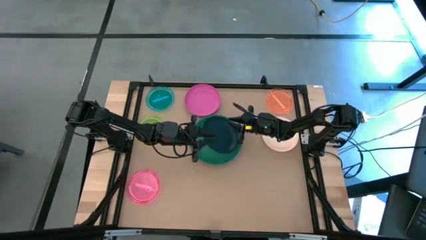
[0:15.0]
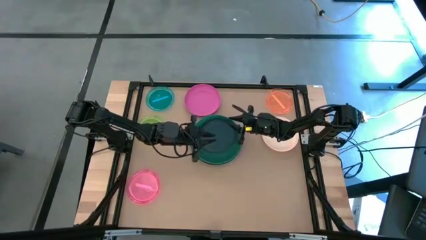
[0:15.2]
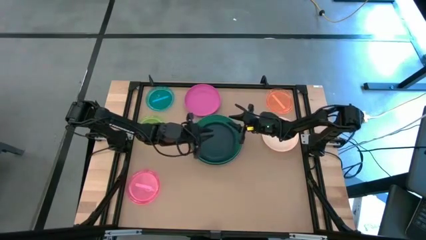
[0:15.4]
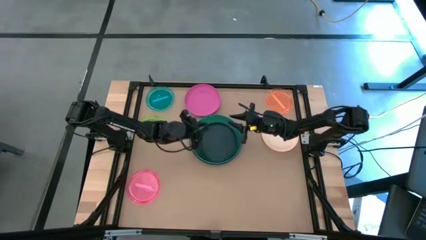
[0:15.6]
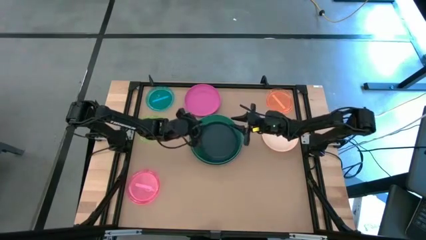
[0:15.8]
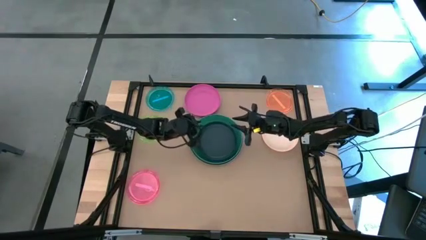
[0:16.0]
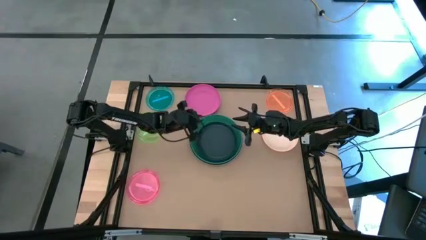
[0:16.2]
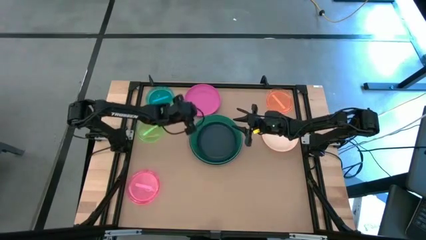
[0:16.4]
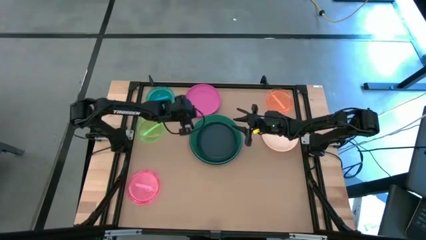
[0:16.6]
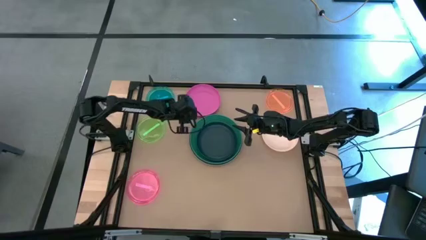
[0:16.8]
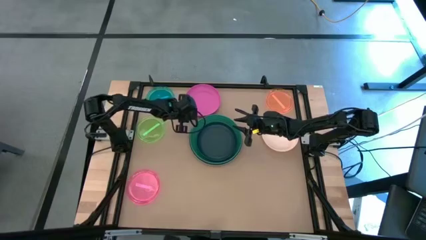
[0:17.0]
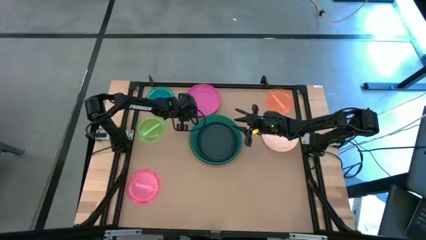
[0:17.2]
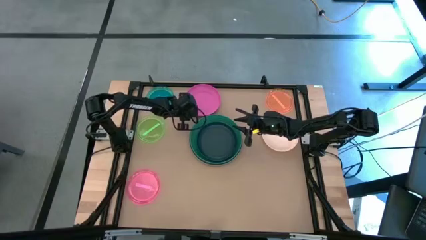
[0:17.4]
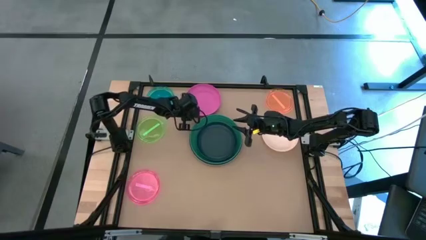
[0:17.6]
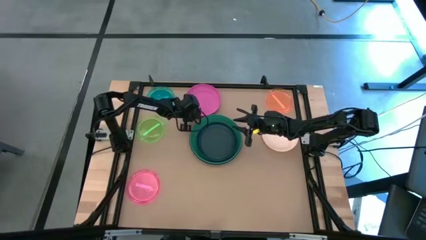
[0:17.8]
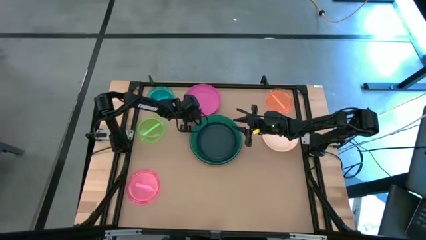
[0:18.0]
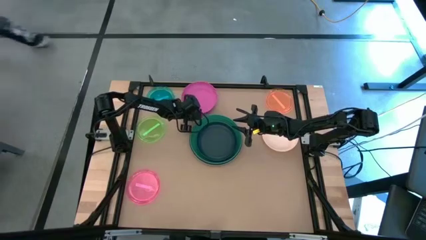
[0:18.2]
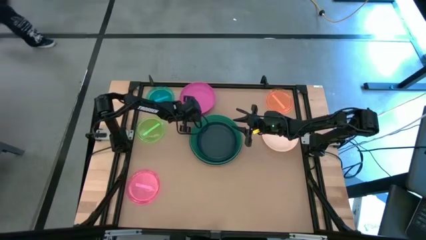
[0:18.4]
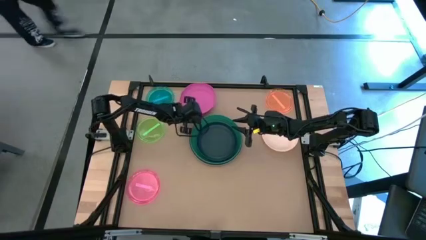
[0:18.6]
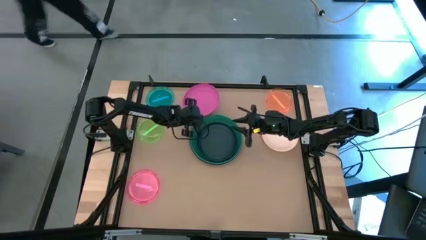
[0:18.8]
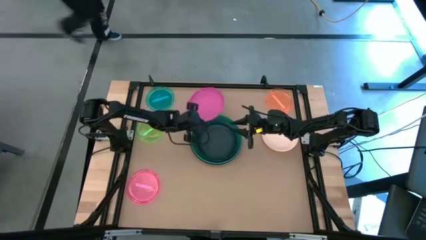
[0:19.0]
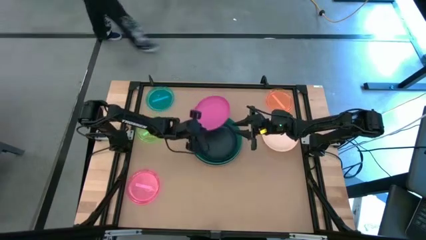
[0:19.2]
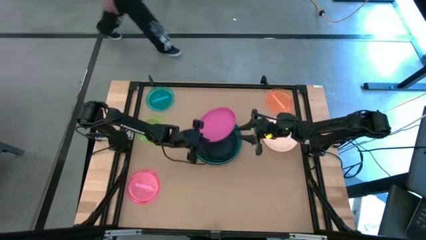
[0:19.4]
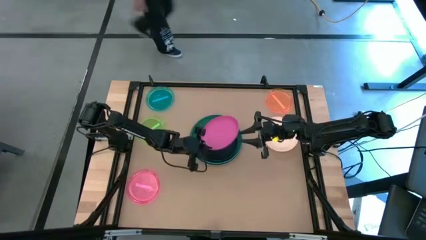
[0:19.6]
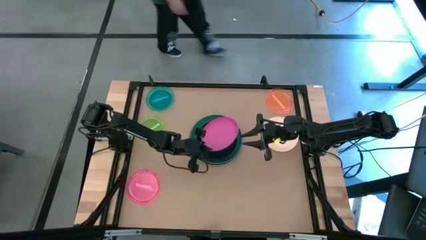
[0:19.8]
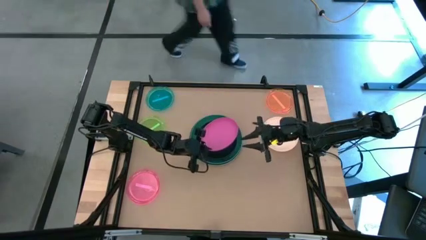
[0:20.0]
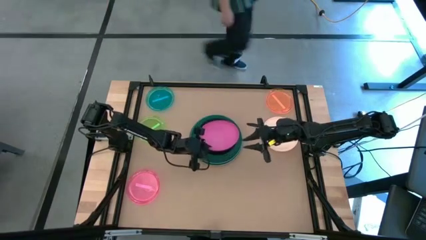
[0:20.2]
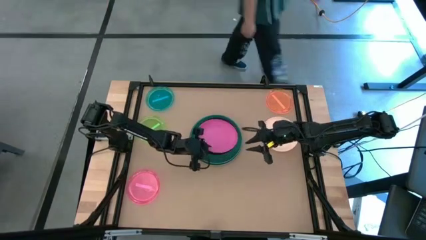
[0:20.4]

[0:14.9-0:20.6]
Task: Stack plastic plates
Stack the pink plate on the dark blue plate

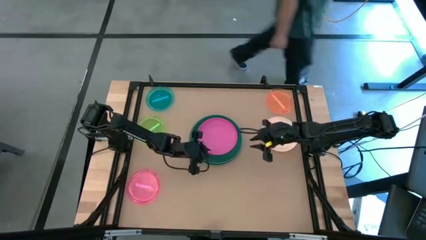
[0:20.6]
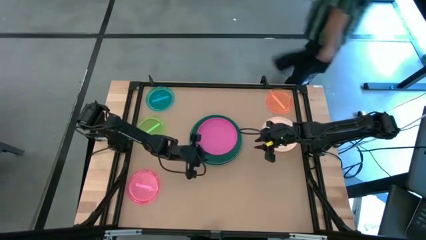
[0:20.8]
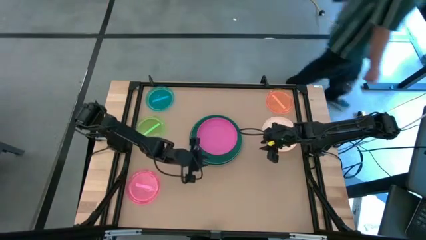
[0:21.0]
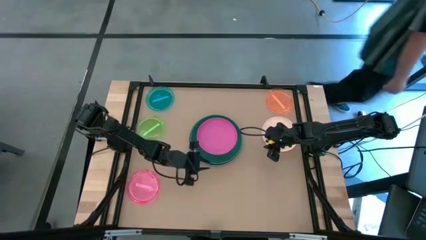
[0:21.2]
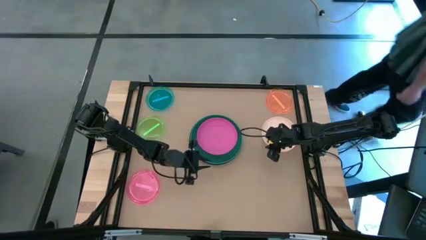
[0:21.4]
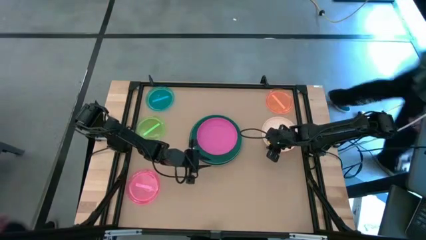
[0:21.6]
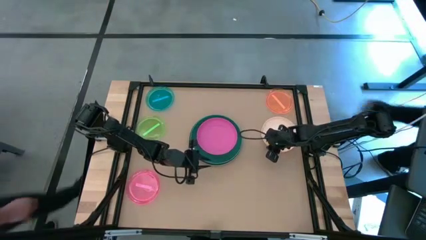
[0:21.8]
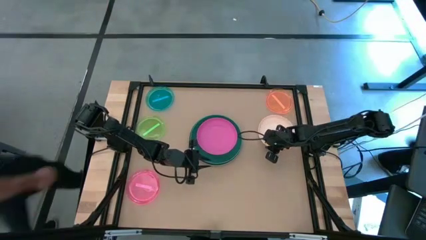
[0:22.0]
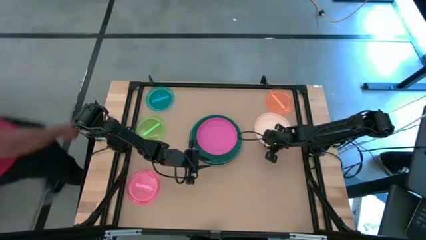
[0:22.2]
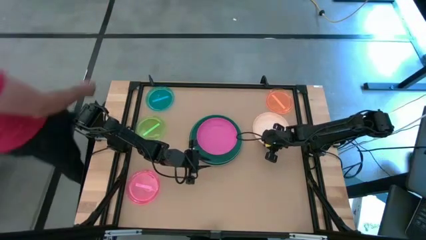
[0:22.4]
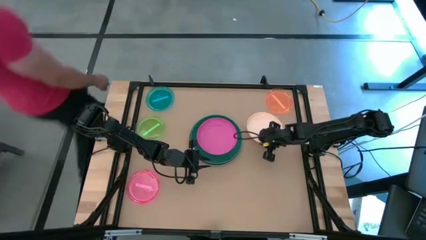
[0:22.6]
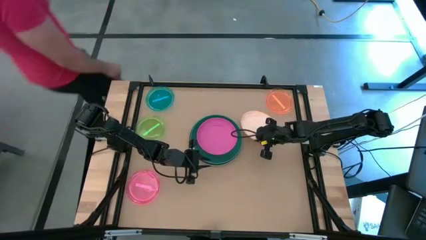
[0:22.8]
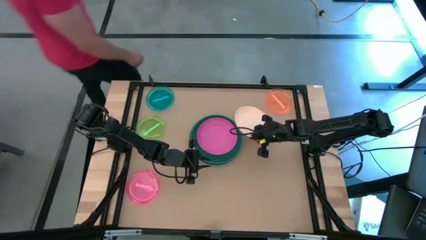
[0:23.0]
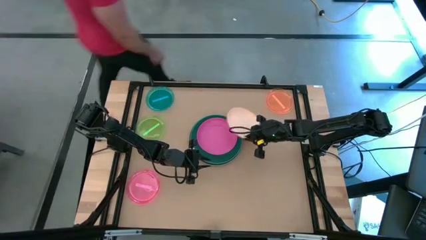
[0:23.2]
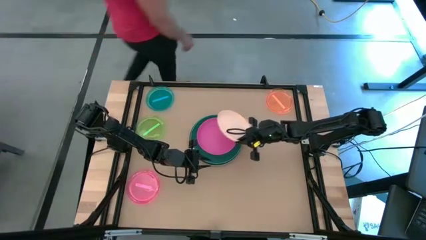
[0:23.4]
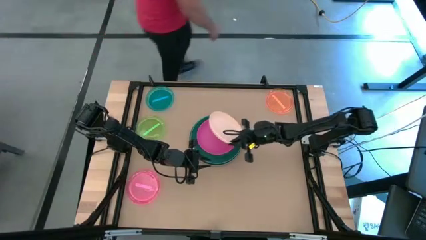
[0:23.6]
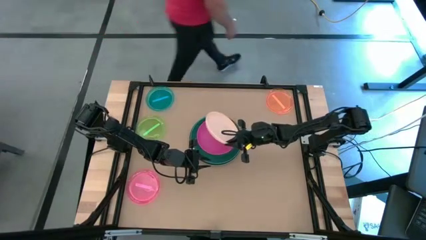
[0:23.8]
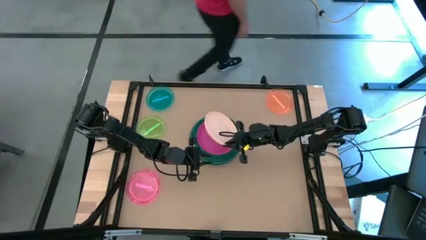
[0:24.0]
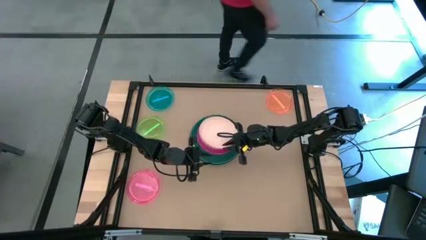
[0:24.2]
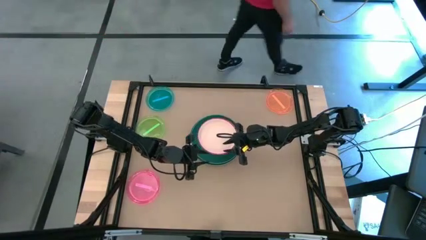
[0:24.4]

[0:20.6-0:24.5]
Stack the light pink plate on the pink plate

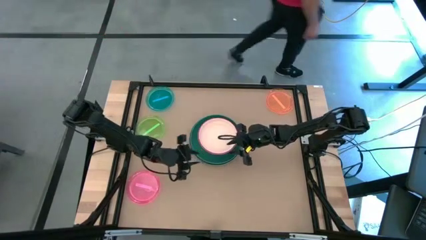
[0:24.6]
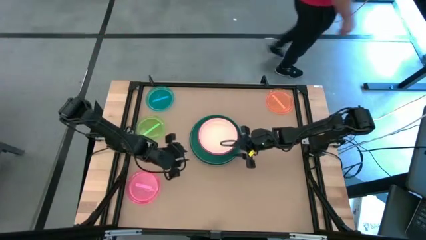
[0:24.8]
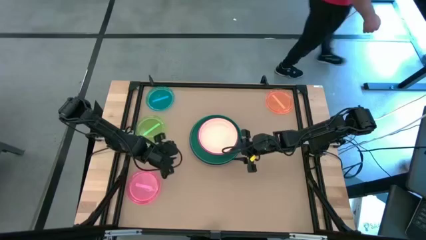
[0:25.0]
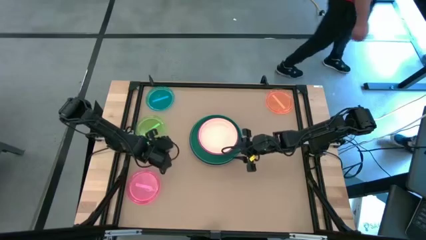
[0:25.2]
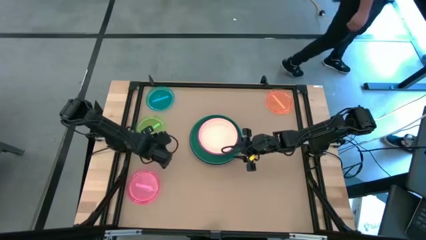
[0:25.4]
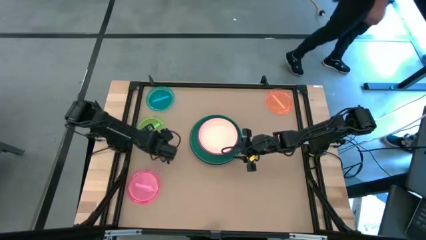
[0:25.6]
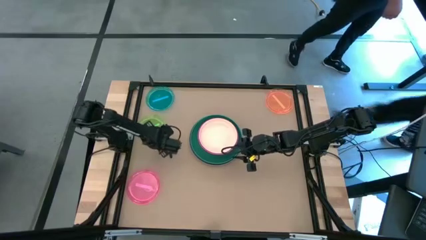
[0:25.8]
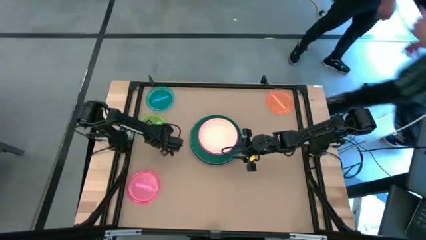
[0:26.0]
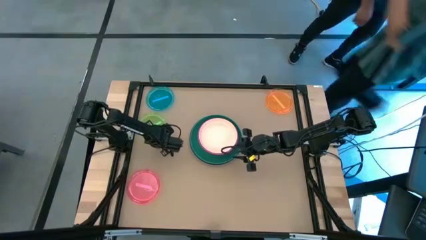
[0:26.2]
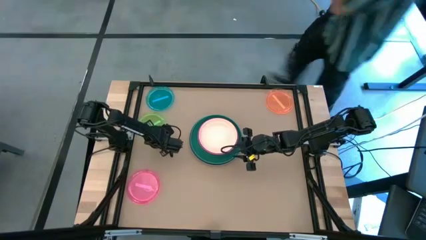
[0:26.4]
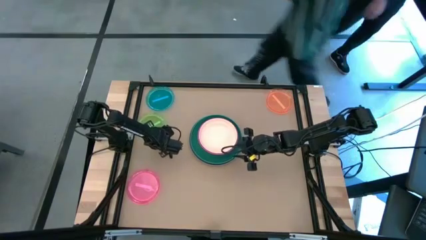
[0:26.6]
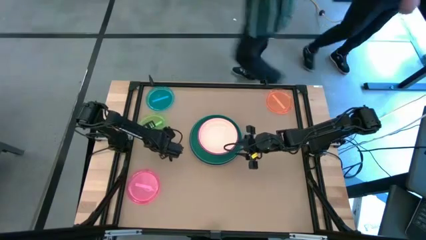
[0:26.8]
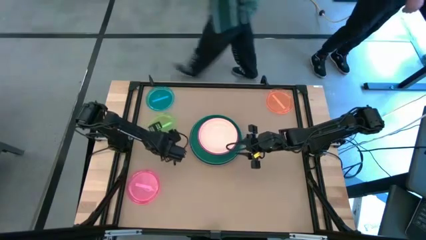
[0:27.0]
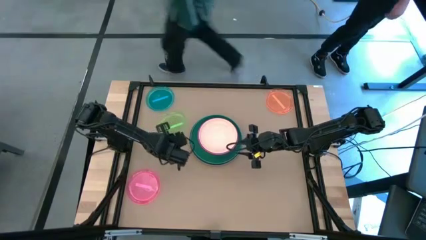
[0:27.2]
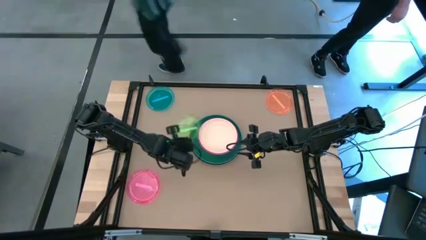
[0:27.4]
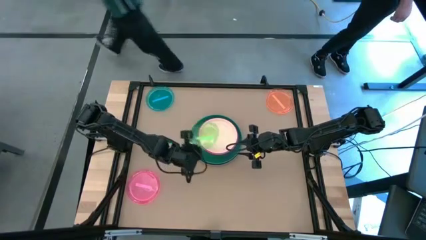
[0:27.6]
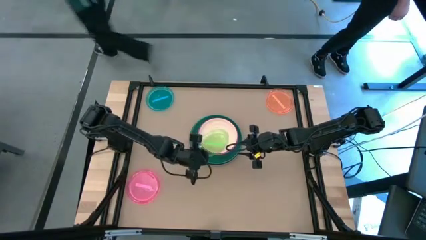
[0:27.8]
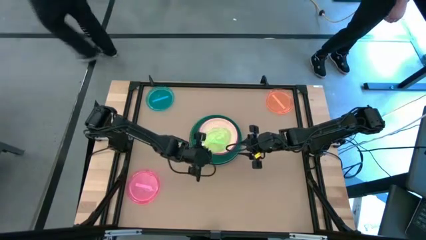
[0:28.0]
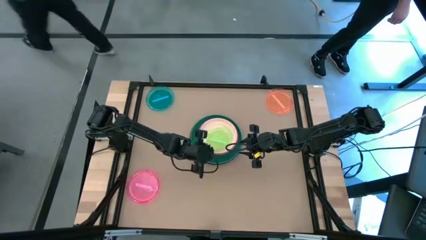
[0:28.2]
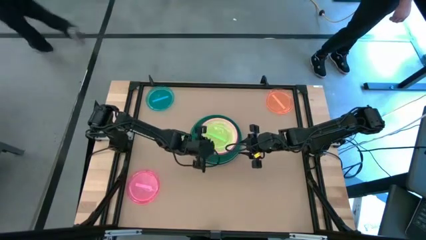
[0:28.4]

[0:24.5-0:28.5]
Stack the green plate on the light pink plate

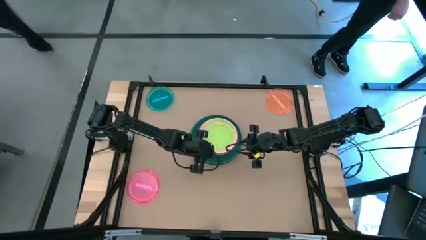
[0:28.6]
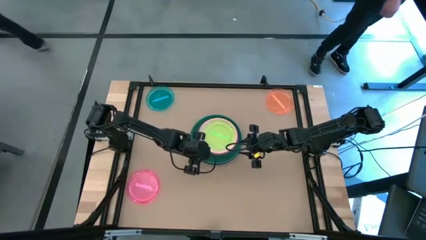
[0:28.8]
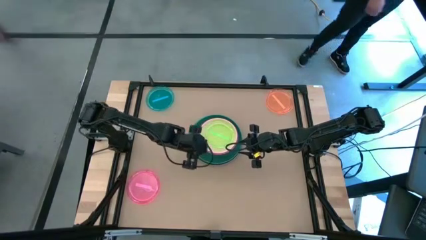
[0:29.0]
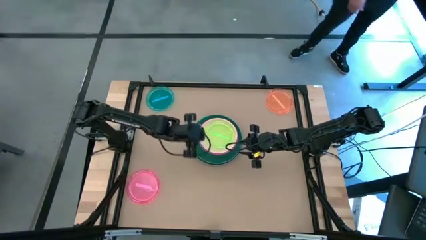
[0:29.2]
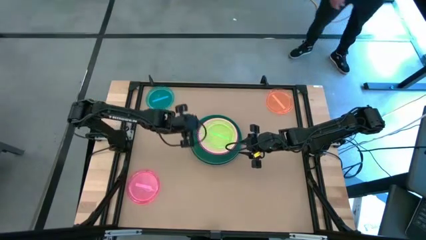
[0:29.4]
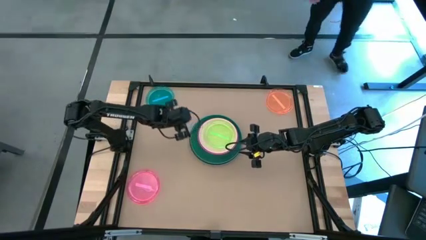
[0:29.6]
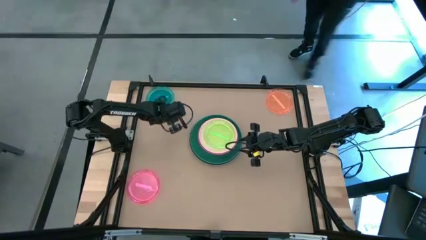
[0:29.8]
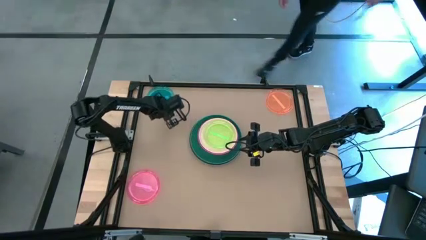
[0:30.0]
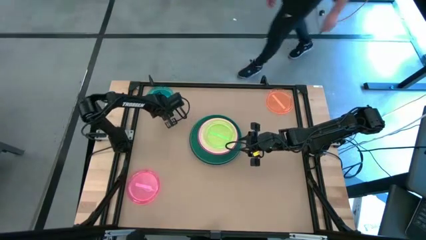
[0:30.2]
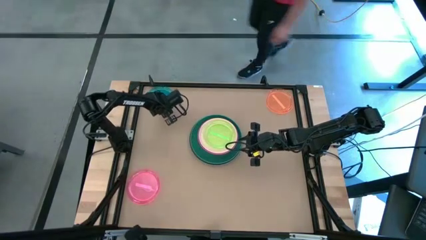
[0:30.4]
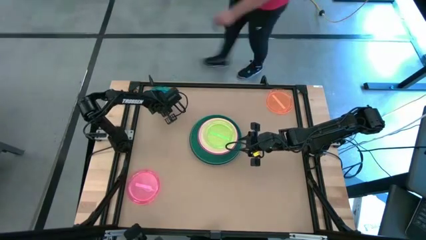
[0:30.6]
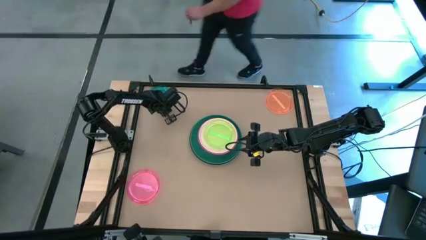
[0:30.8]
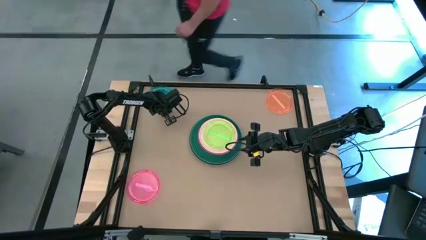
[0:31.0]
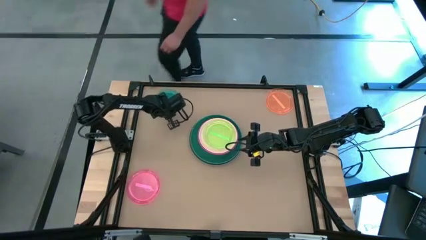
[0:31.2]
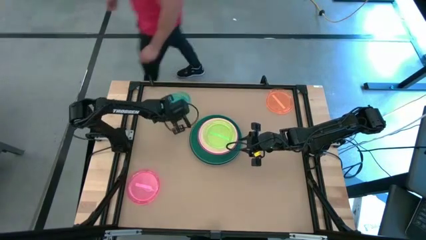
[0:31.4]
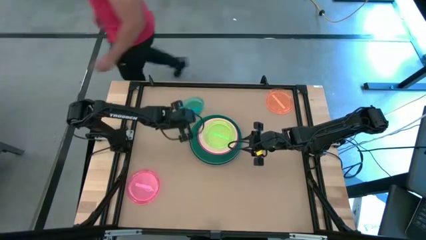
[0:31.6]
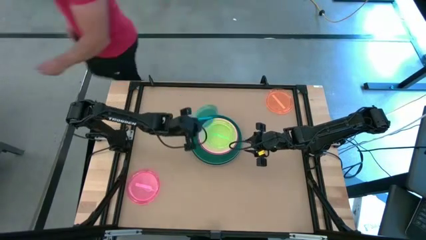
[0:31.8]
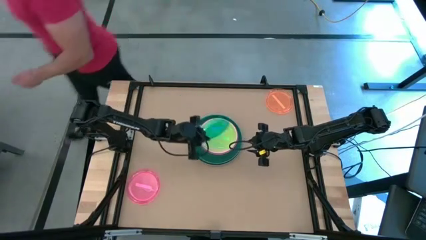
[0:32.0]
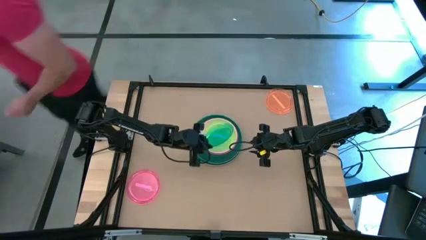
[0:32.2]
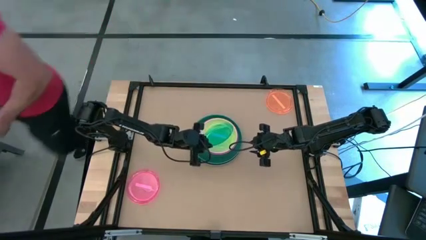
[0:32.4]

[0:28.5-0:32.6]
Stack the blue plate on the green plate
